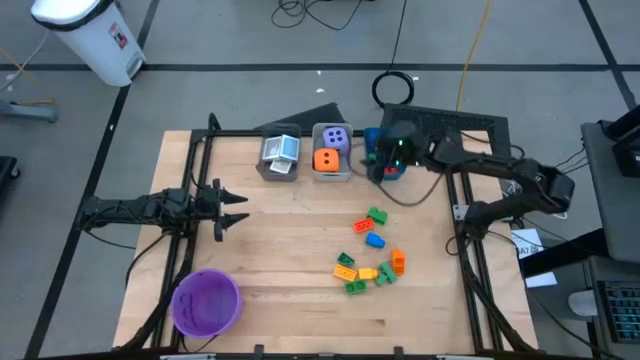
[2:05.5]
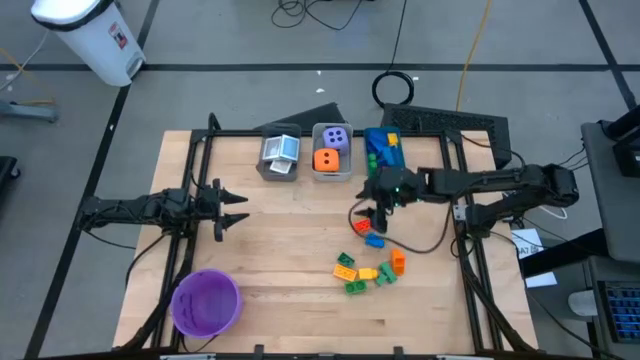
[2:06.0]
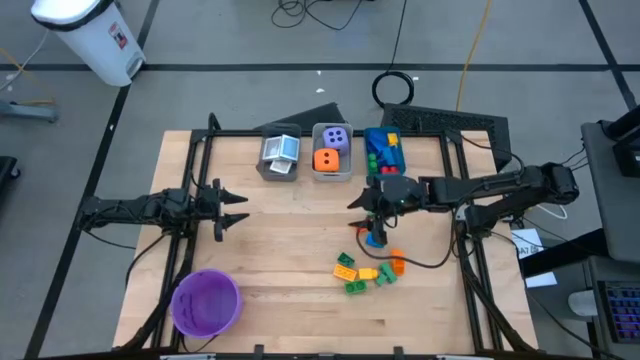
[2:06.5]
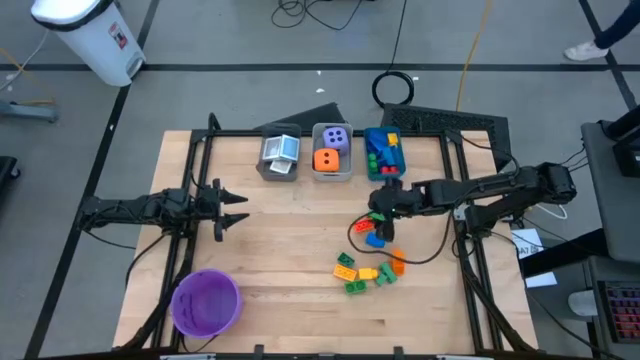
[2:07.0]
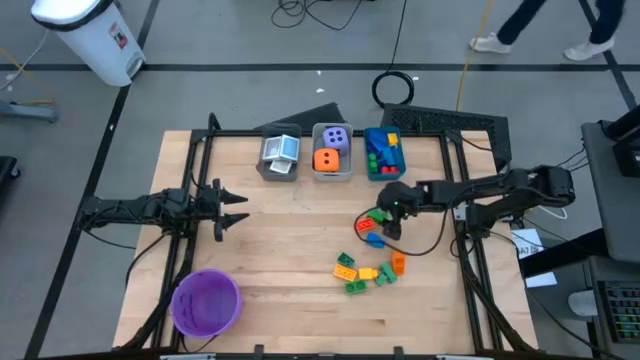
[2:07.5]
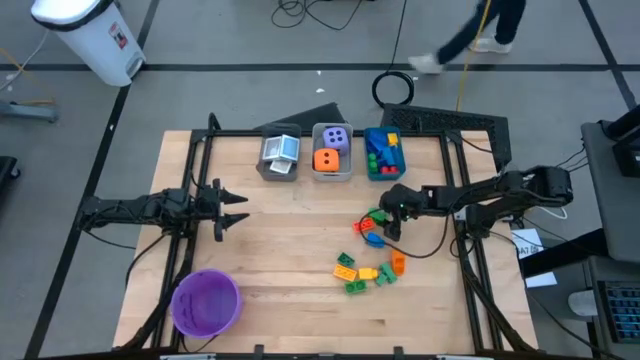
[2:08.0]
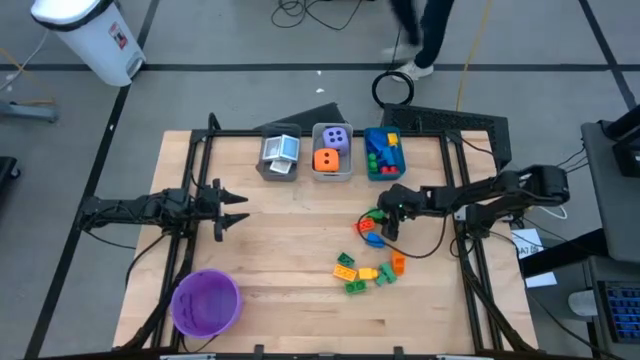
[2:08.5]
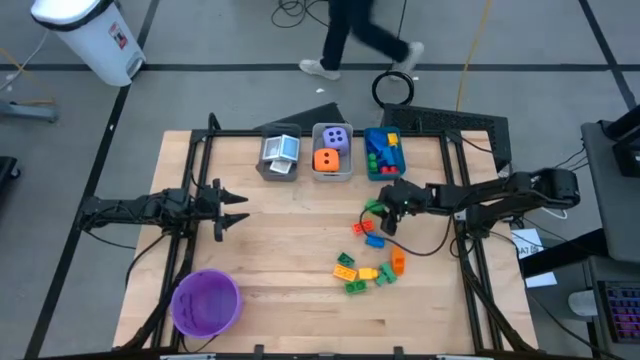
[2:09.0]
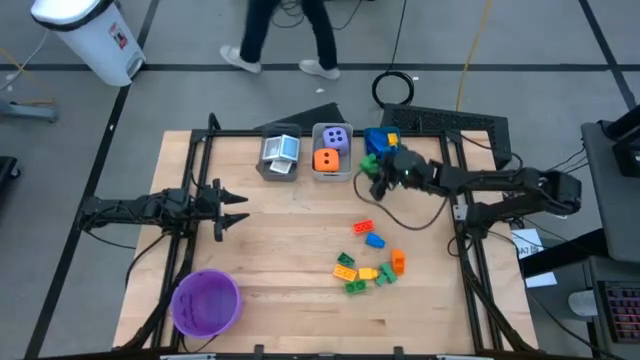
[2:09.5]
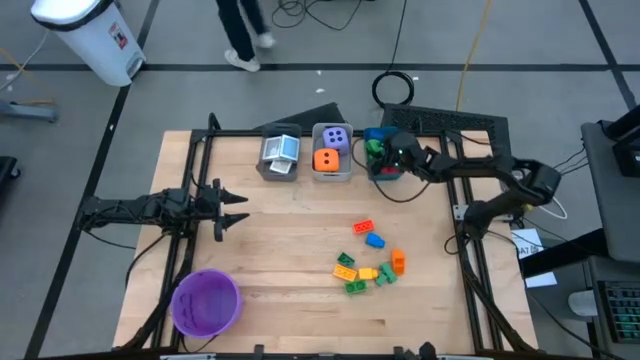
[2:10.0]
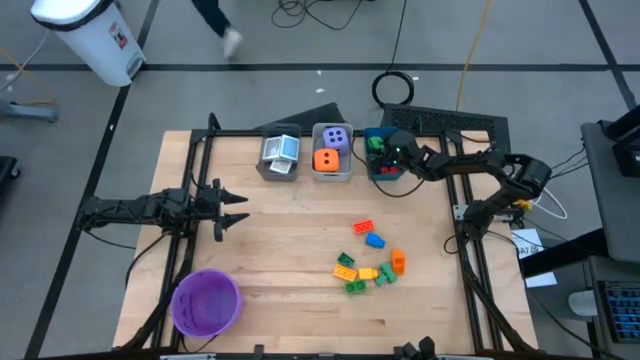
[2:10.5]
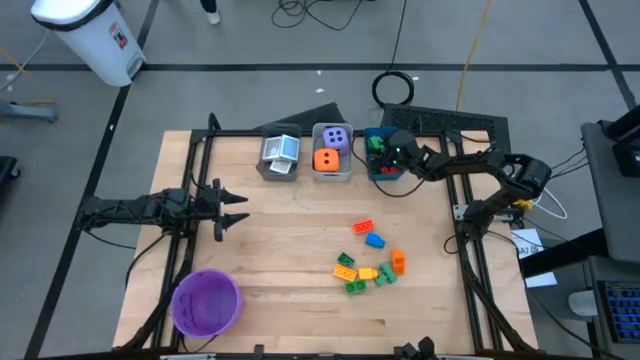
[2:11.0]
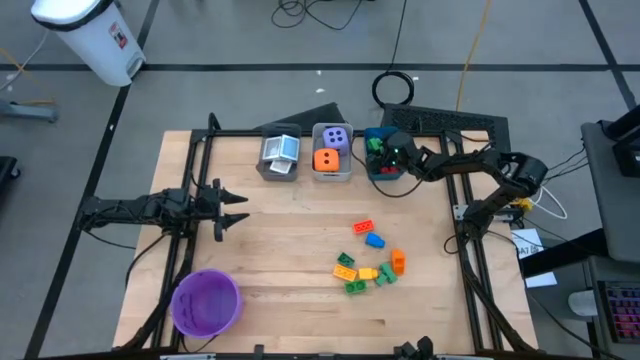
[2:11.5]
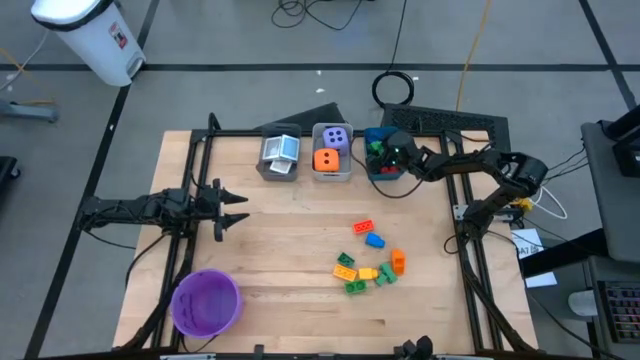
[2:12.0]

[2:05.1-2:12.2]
Task: Pick & Place Toys
Put the green game piece into the blue bin

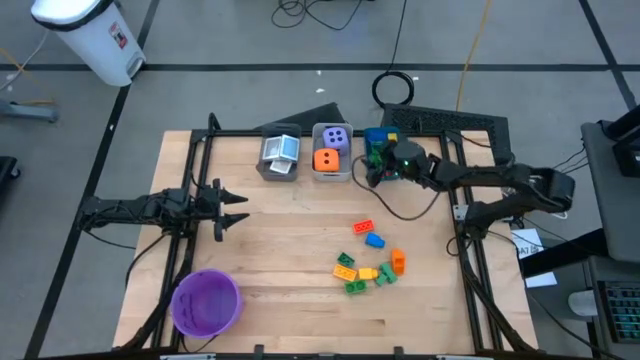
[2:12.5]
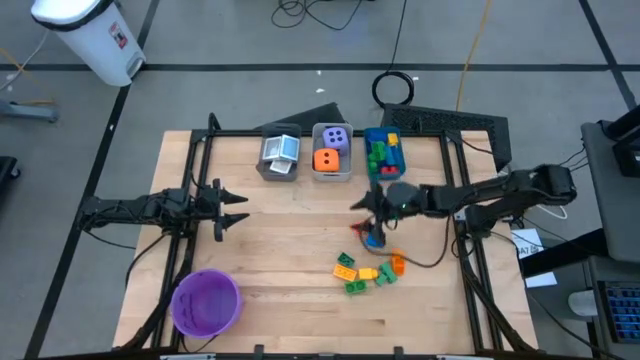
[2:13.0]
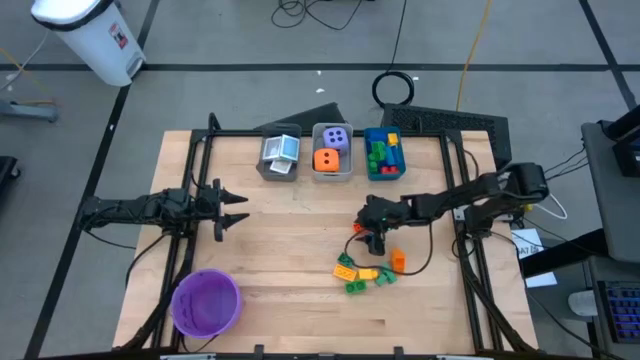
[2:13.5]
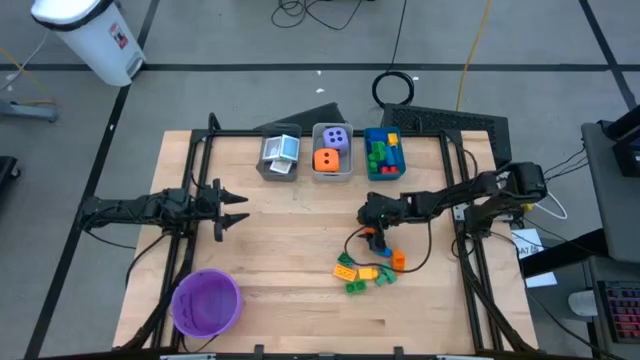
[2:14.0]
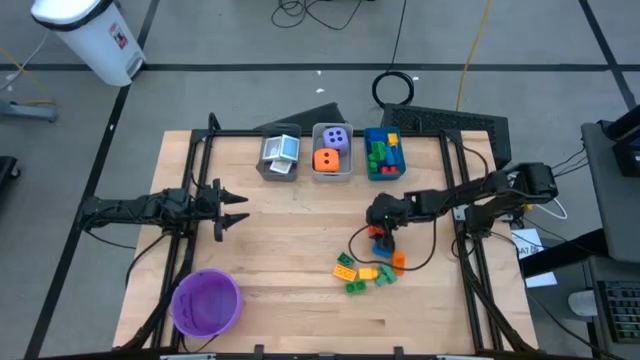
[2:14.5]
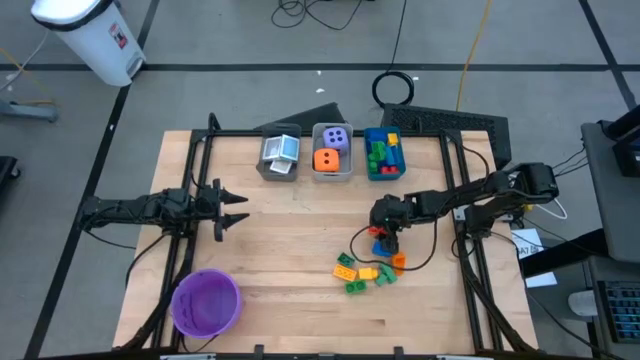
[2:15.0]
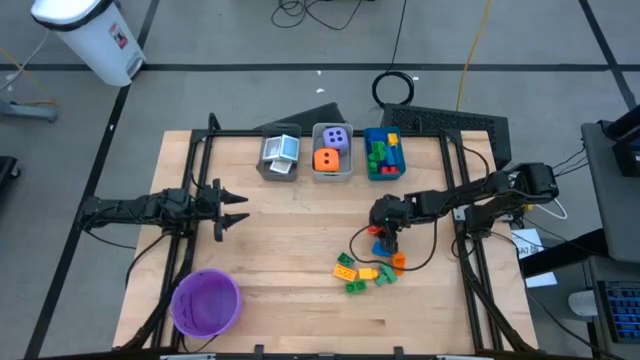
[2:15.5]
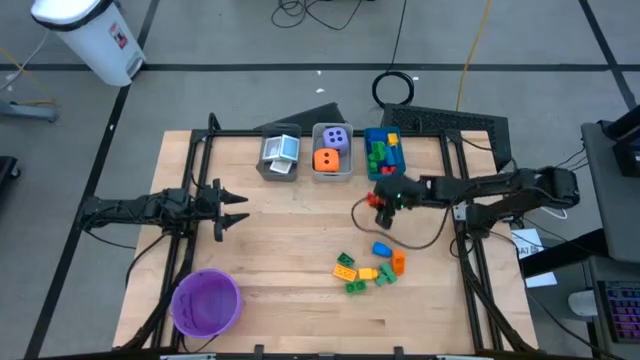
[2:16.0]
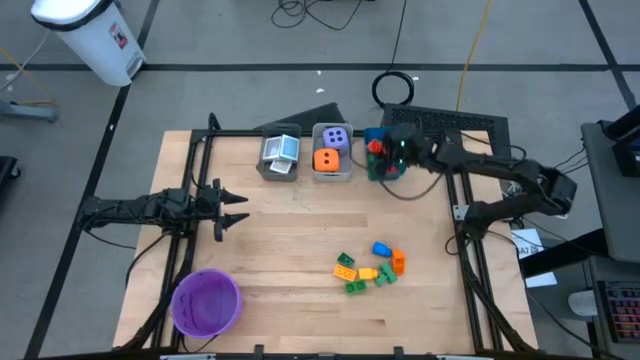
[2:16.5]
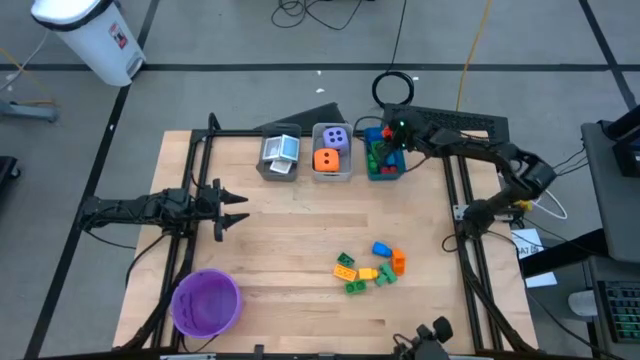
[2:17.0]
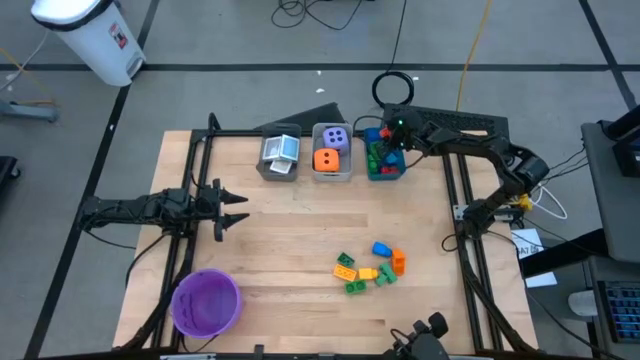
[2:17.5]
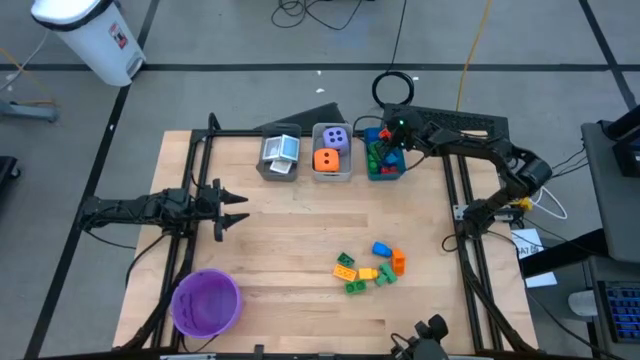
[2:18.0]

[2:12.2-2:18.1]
Put the orange game piece into the blue bin

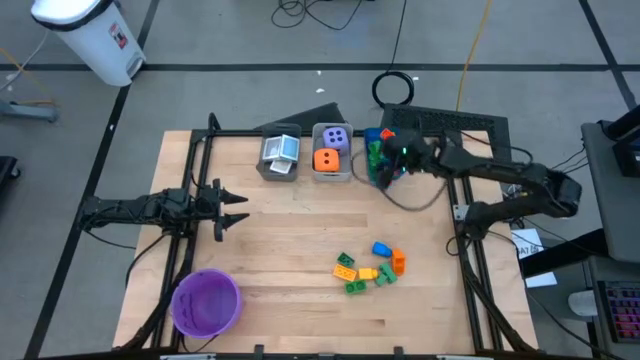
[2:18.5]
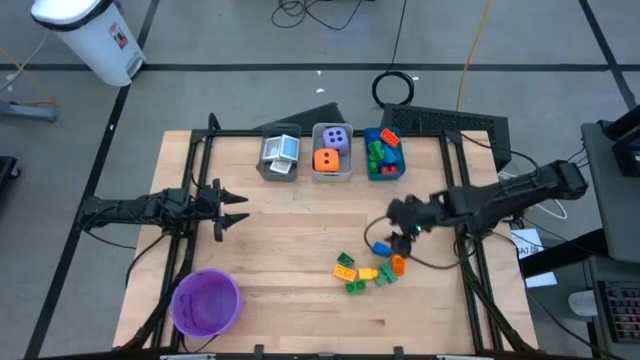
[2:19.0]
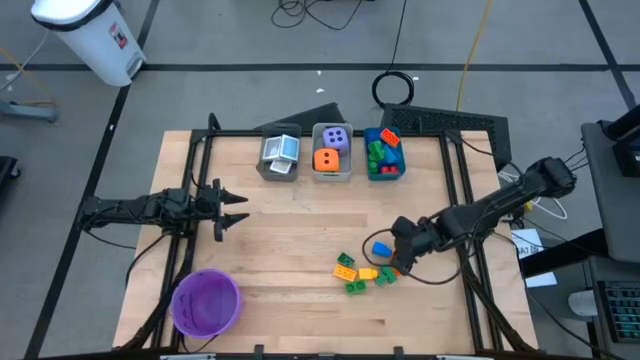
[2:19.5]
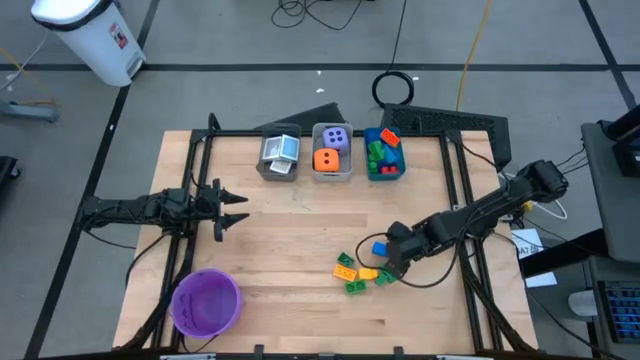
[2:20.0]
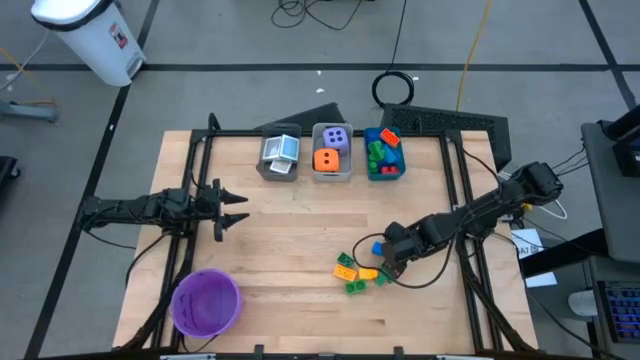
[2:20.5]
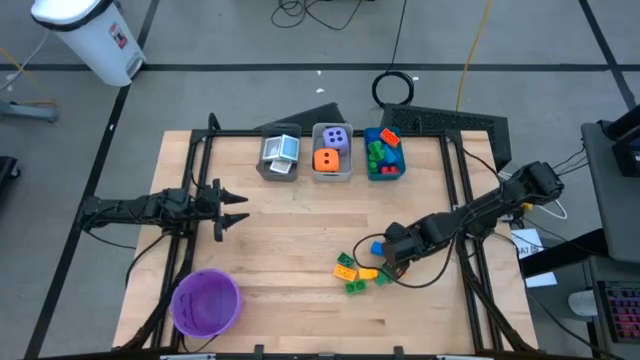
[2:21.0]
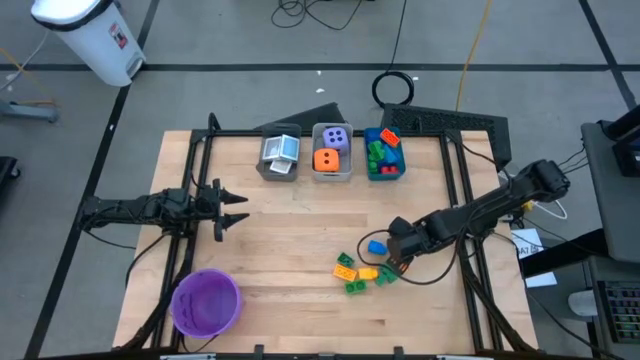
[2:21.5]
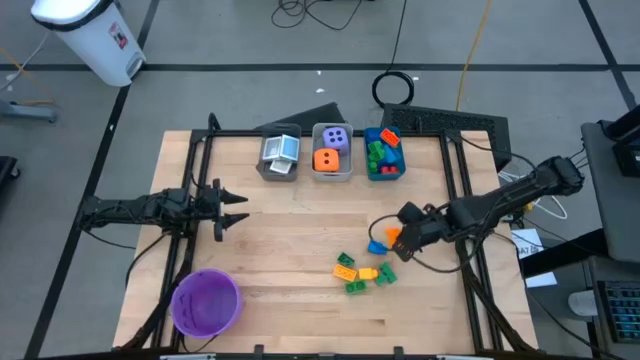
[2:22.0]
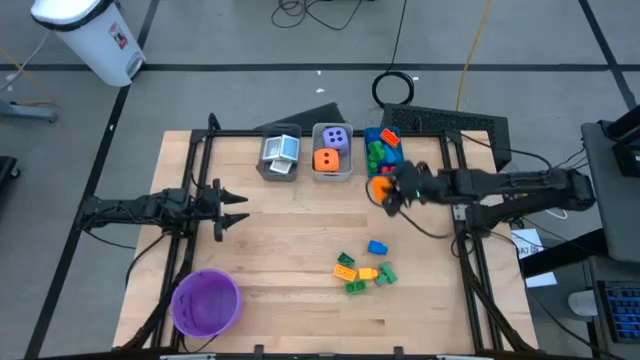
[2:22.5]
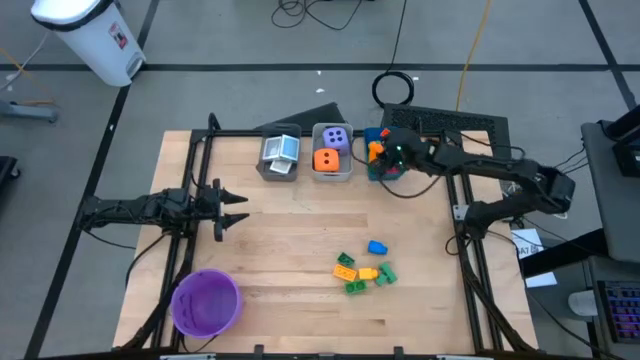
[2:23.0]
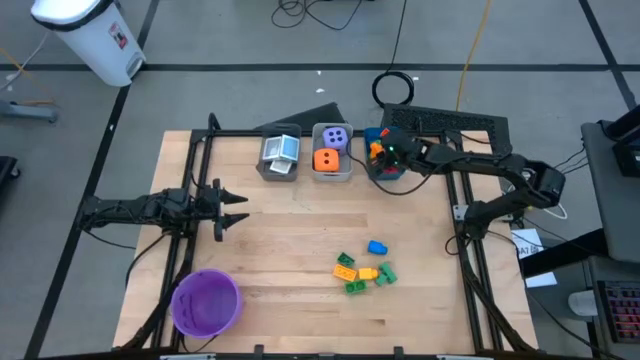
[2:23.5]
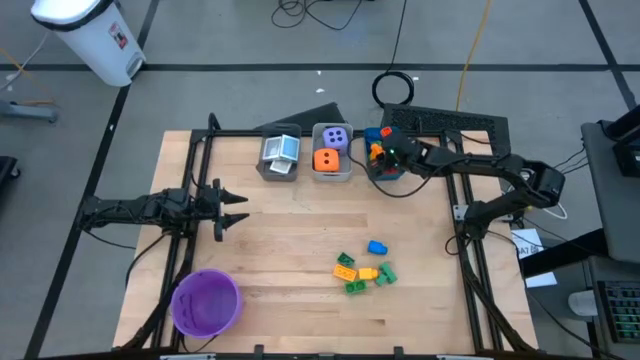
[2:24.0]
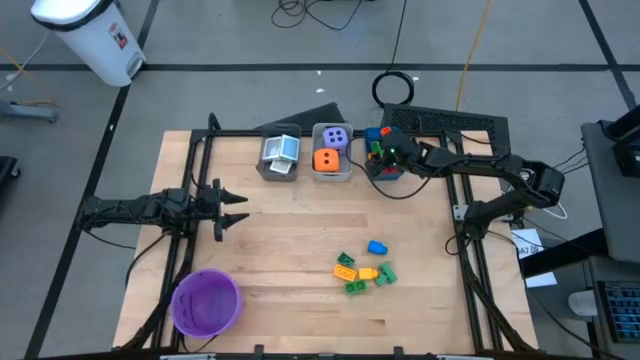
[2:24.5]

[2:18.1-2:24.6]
Put the light orange game piece into the blue bin
